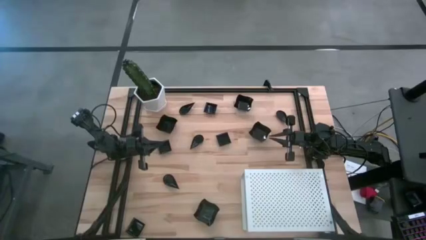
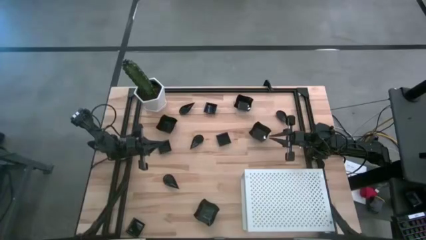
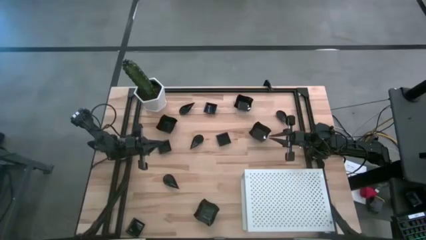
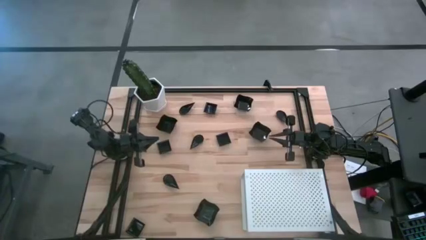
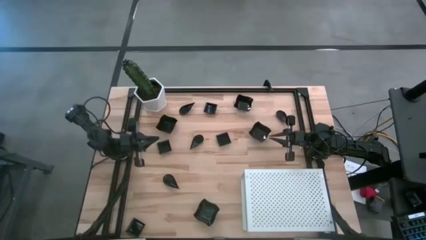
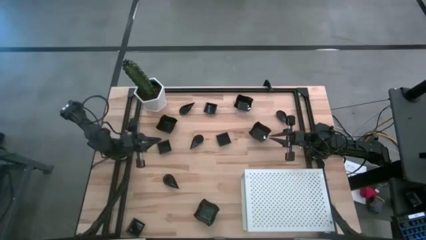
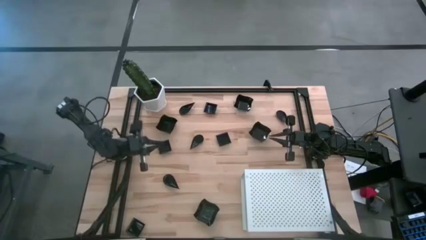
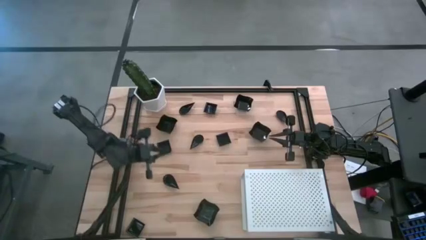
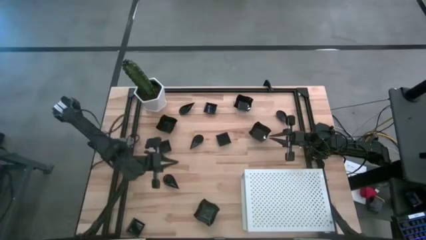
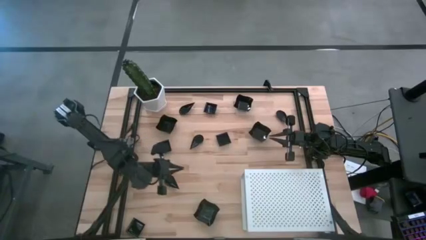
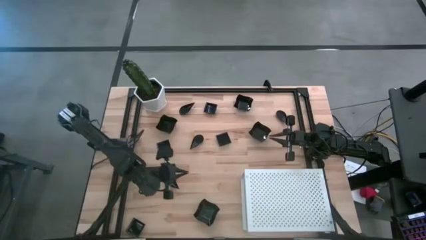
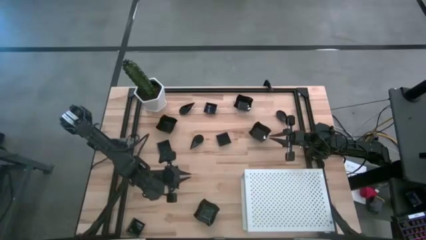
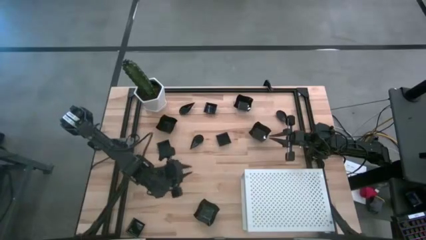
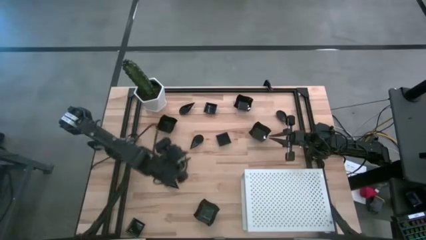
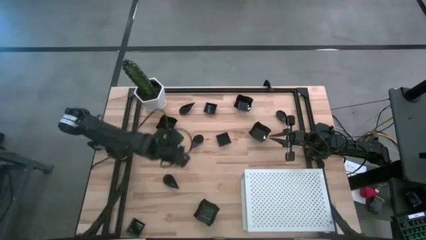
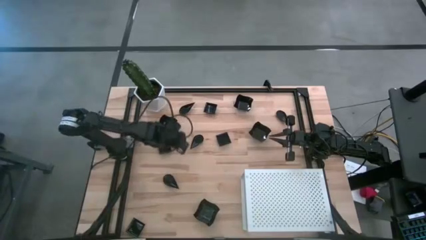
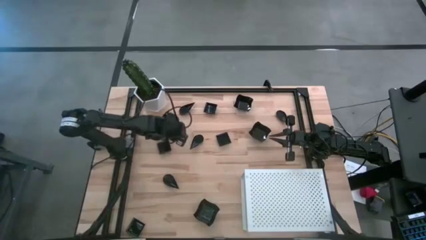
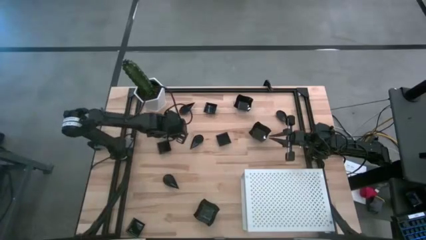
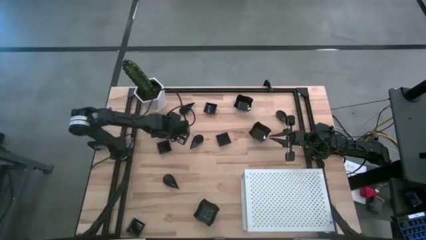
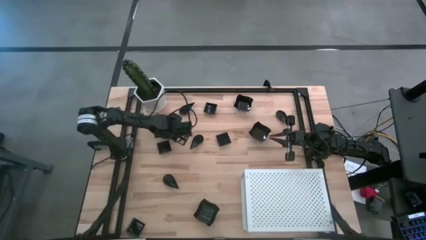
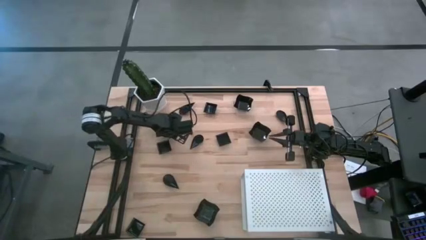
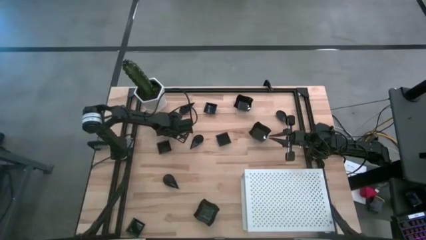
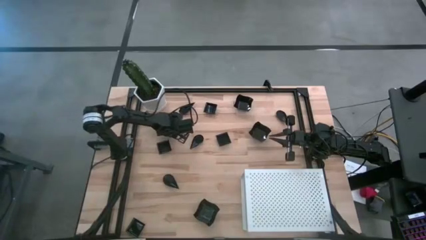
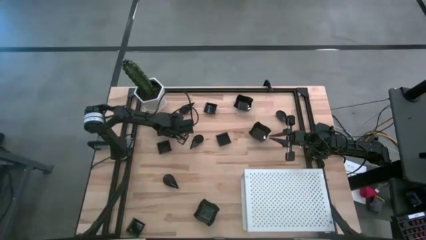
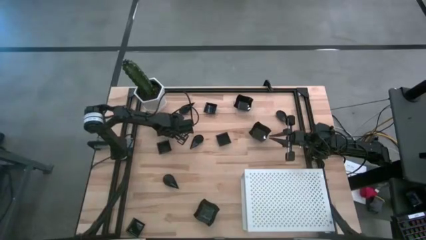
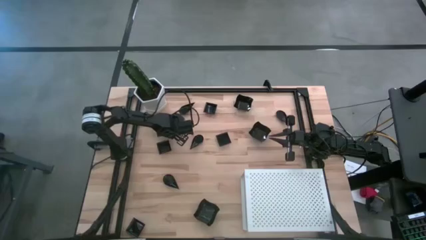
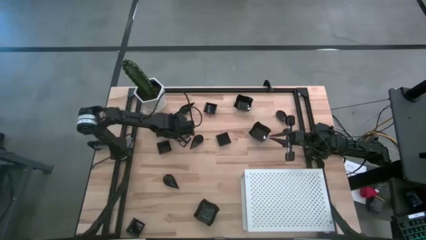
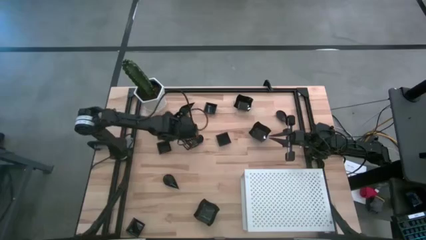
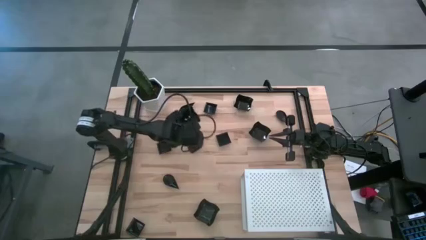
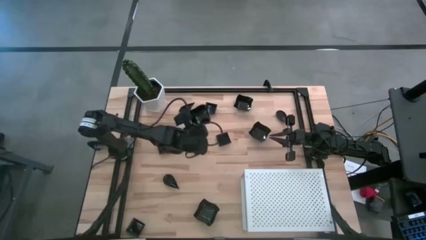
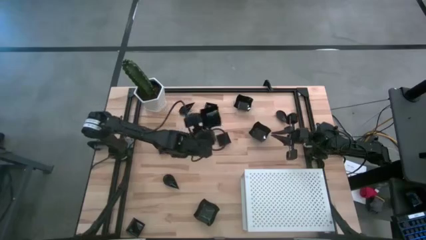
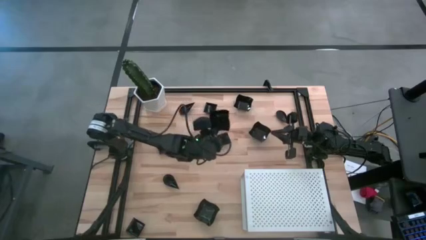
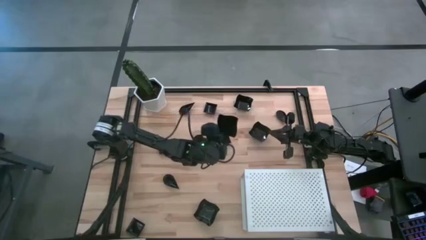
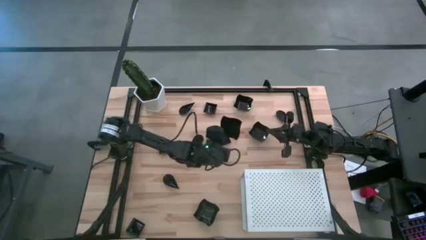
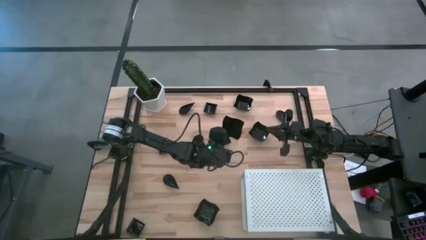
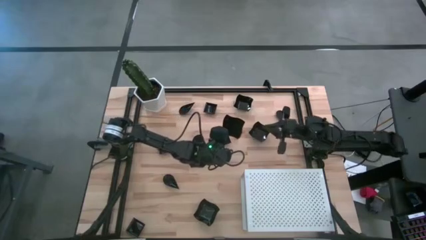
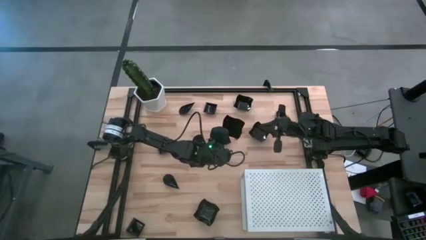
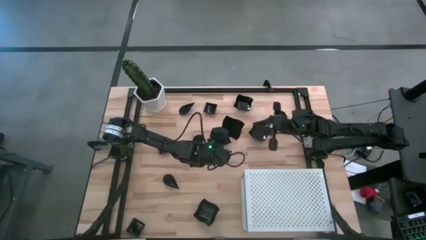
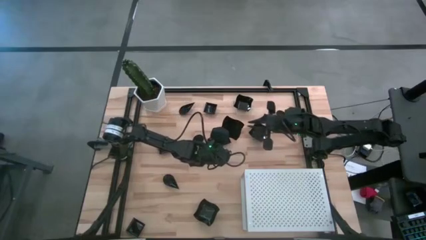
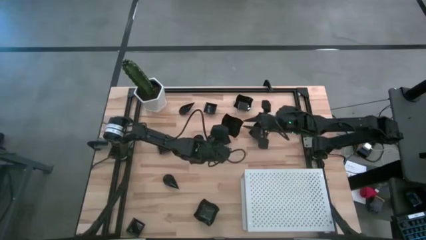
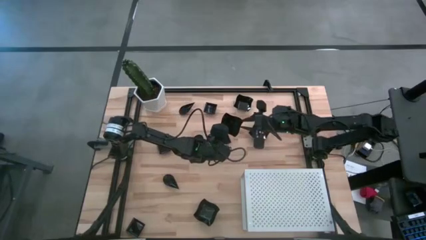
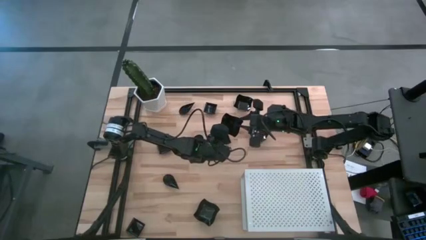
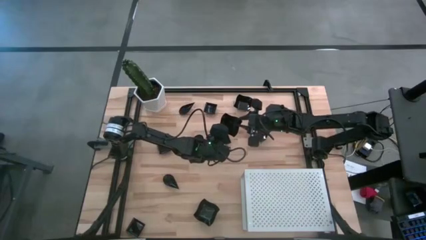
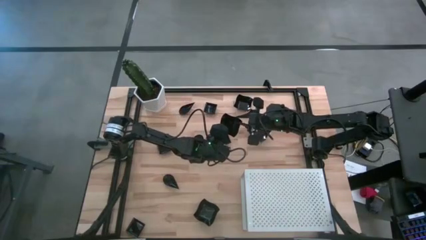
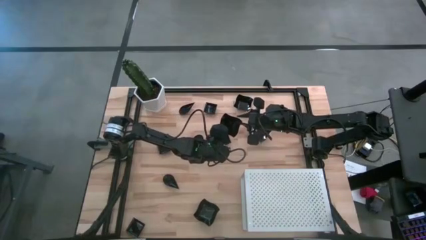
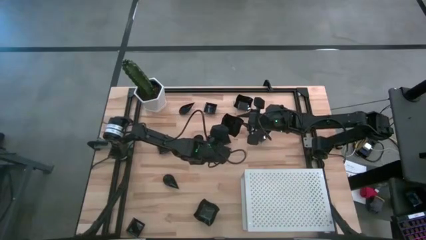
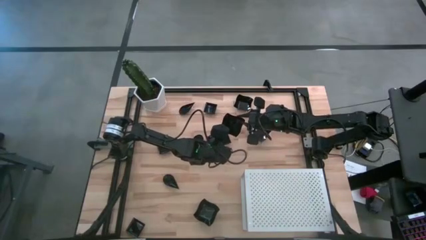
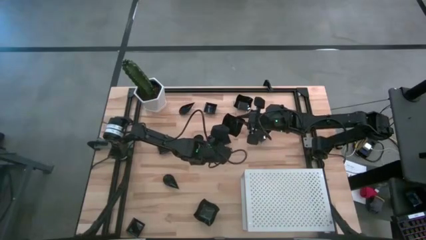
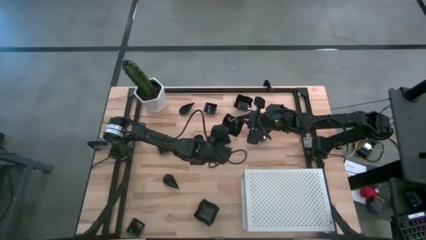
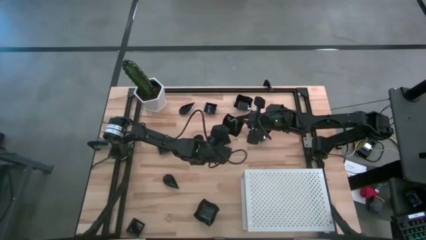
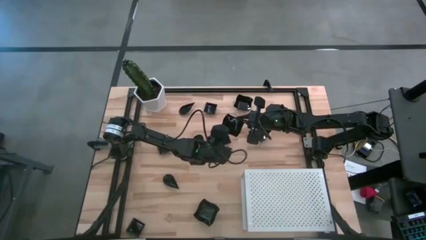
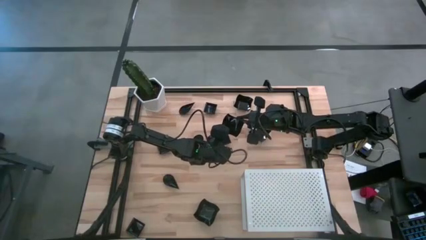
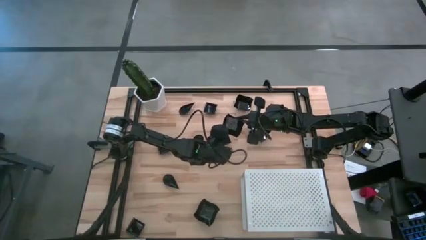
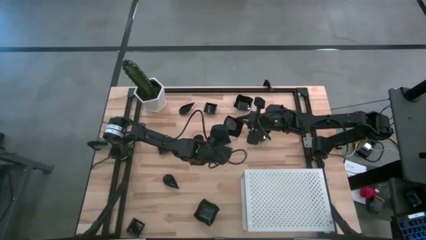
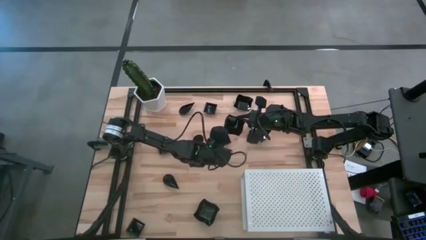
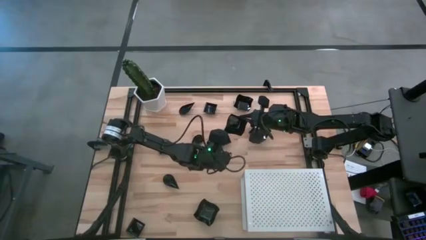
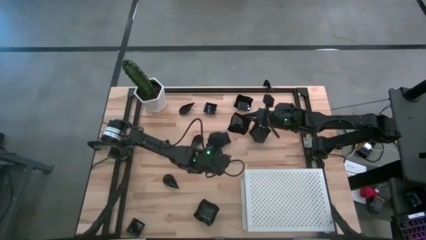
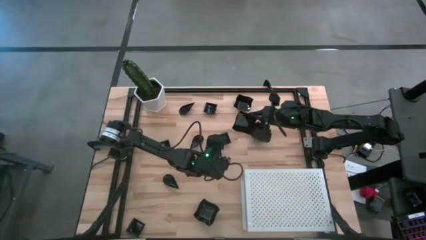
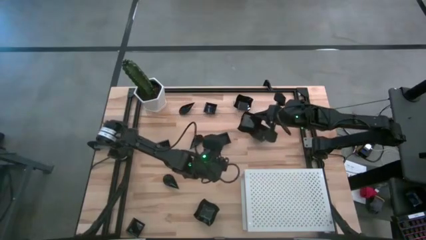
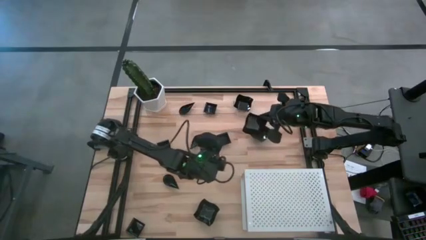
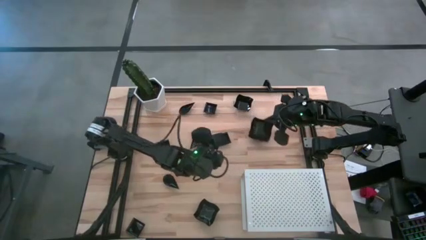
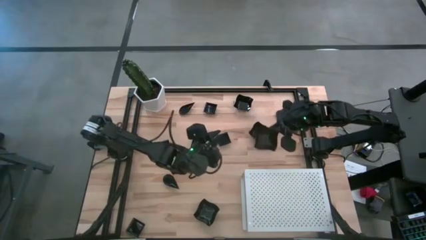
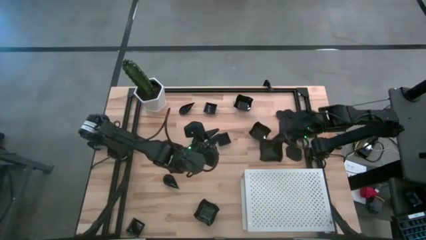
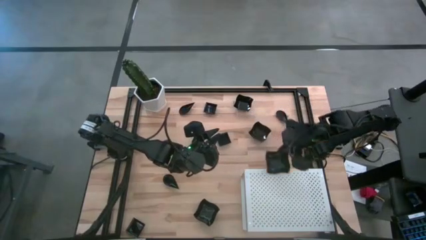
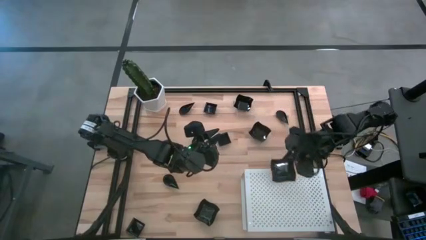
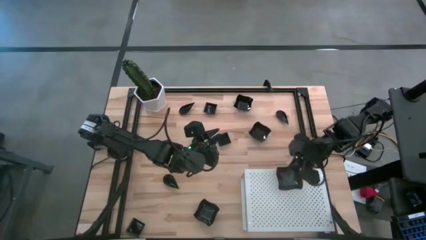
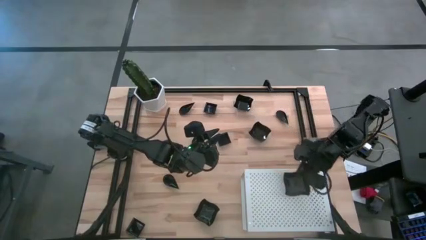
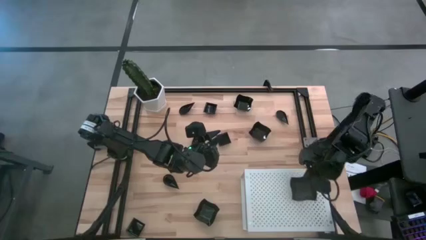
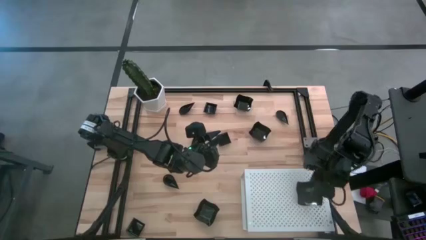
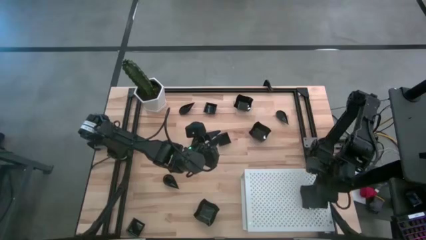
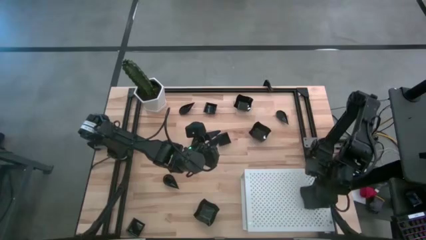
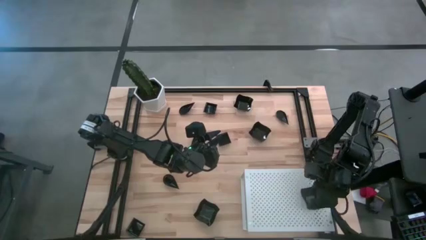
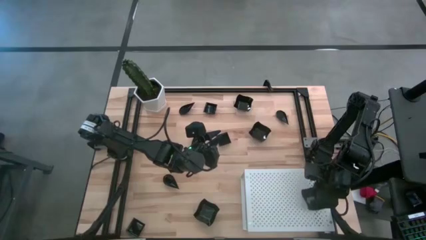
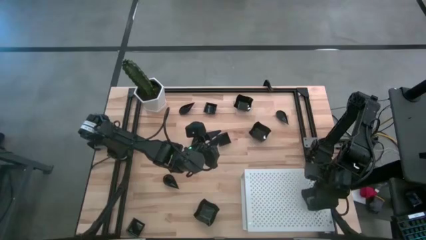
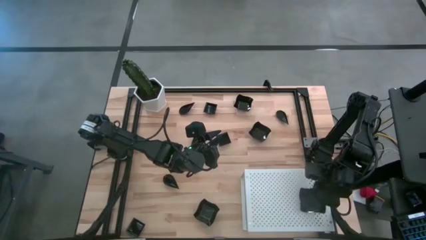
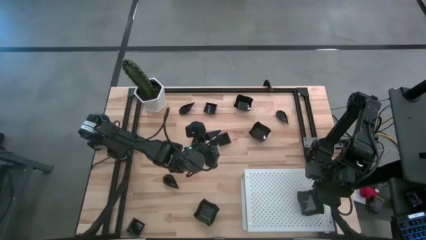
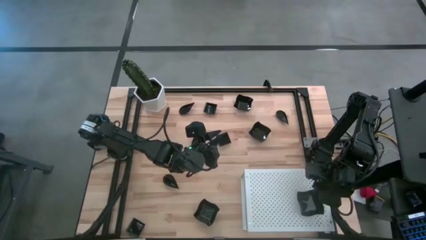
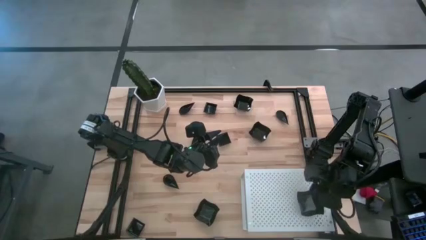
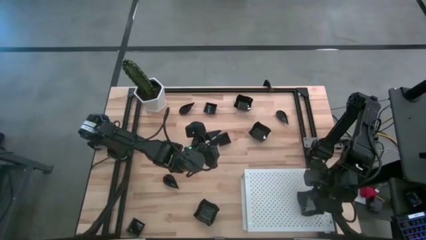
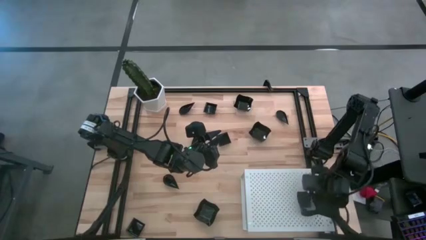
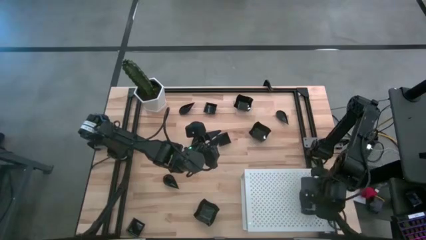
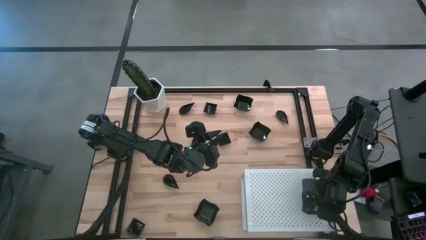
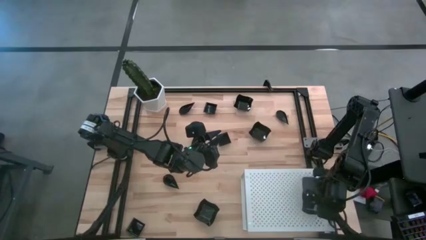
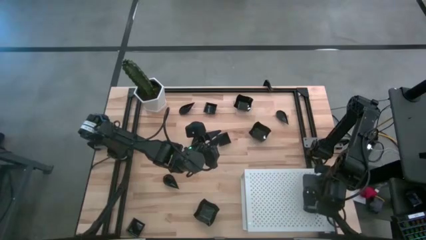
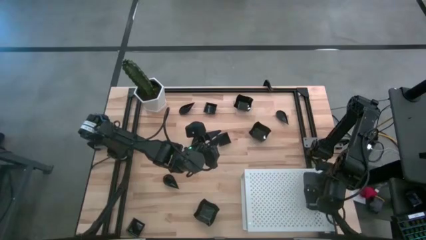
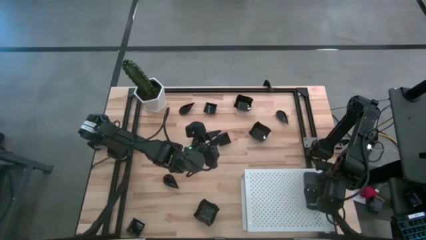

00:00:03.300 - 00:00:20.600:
Task: Pick & Place Mini shaped plates
Put the distorted square plate on the shelf
